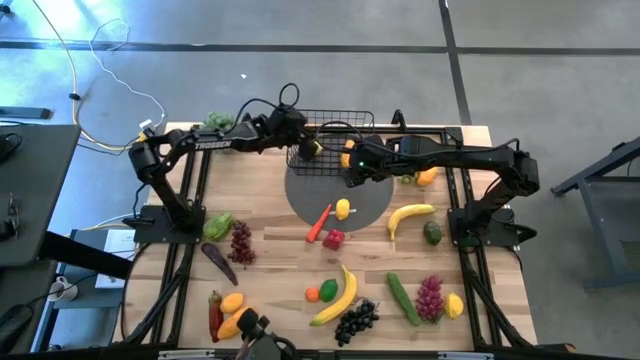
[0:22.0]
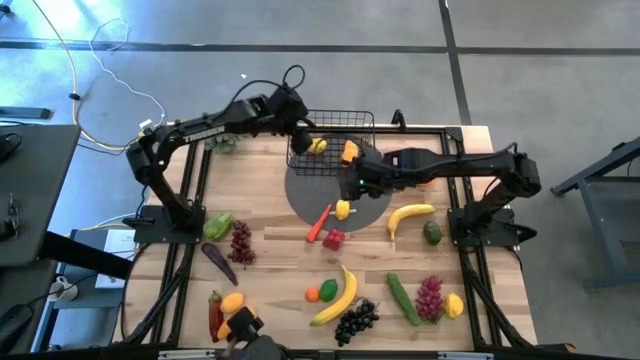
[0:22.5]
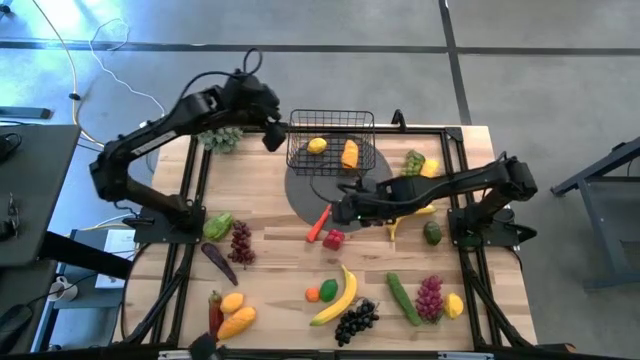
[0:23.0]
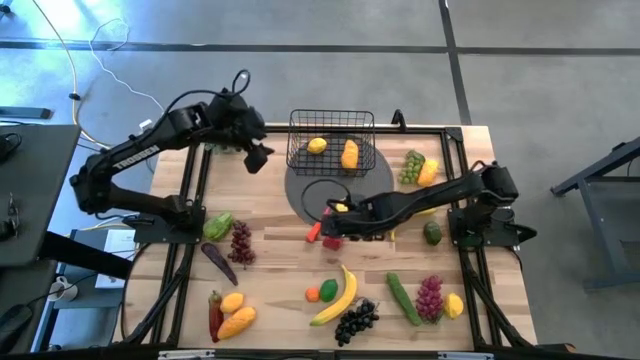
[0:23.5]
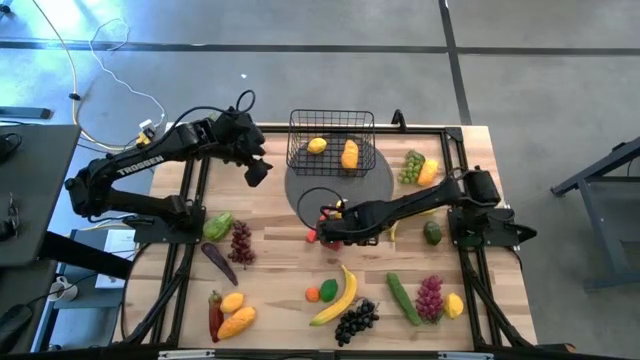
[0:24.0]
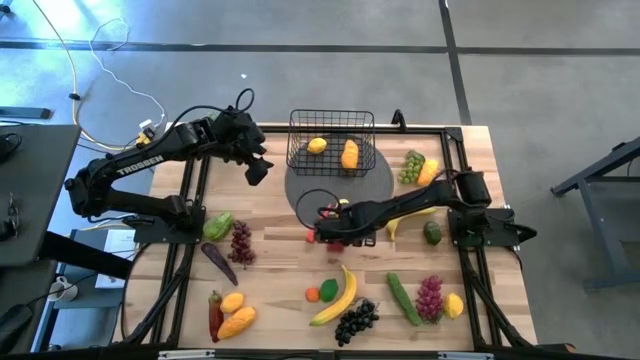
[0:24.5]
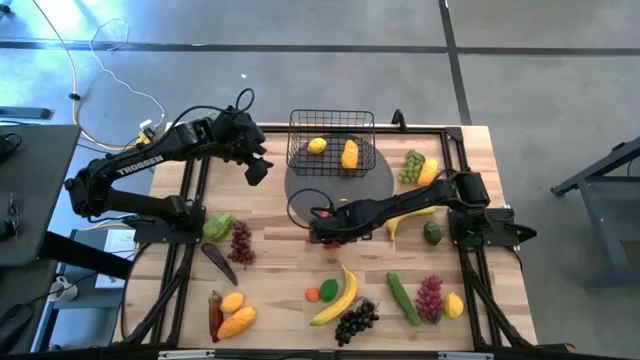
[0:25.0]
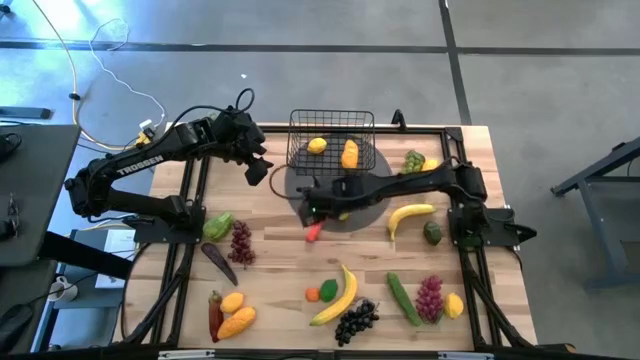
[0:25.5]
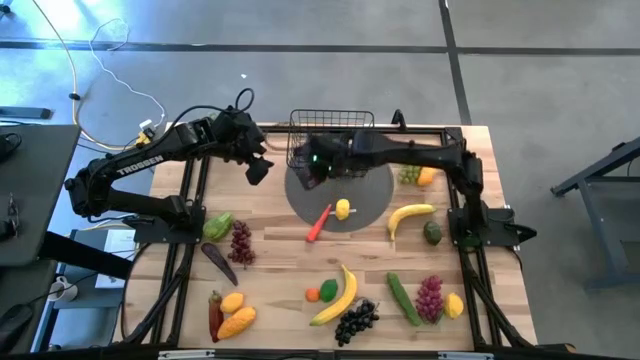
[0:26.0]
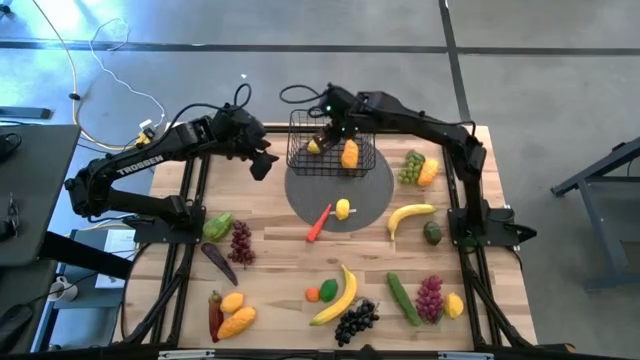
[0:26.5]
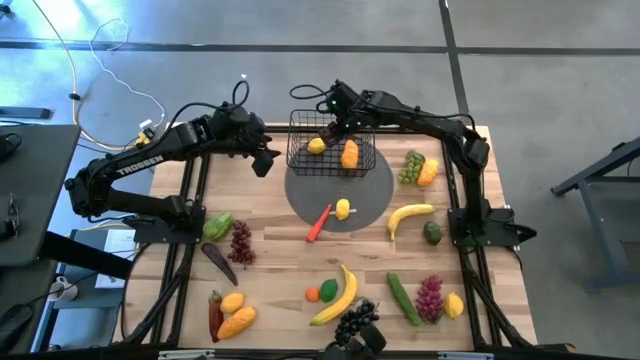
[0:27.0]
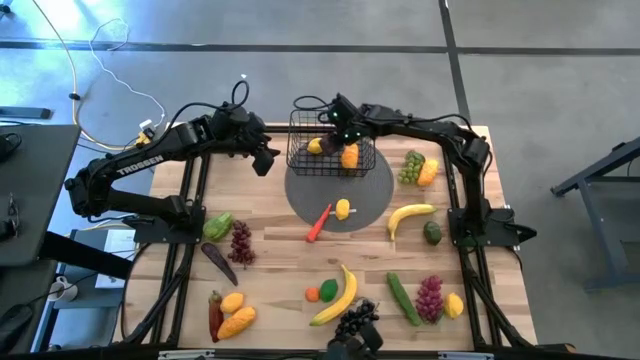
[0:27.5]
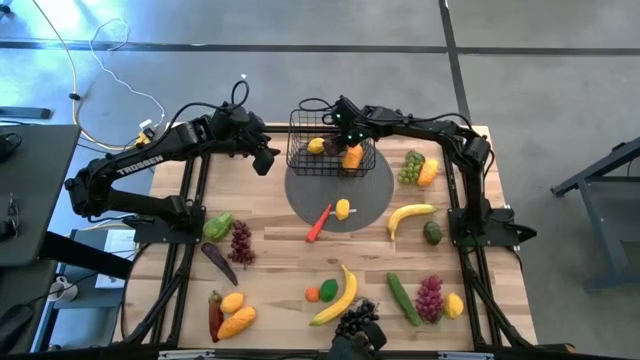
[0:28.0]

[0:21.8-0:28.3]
Task: Build produce basket
Put the bell pepper into the wire basket

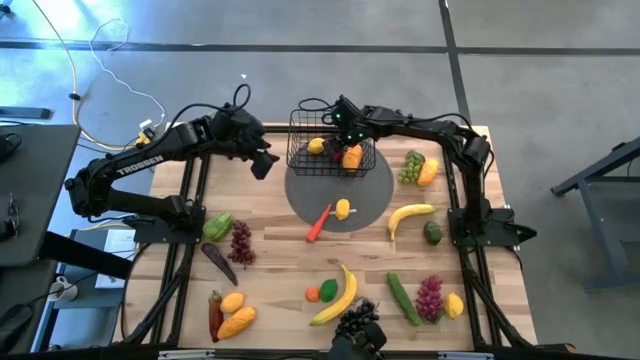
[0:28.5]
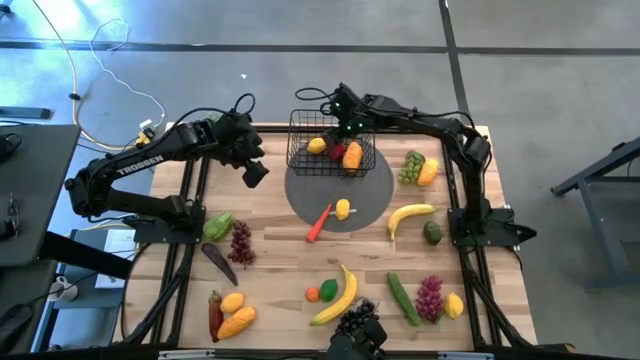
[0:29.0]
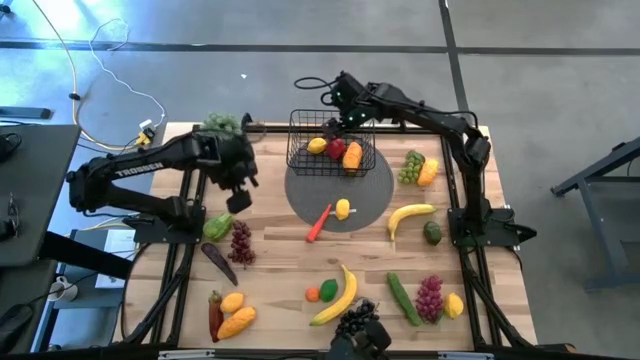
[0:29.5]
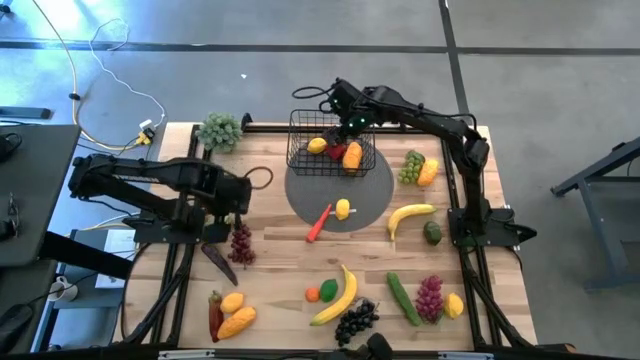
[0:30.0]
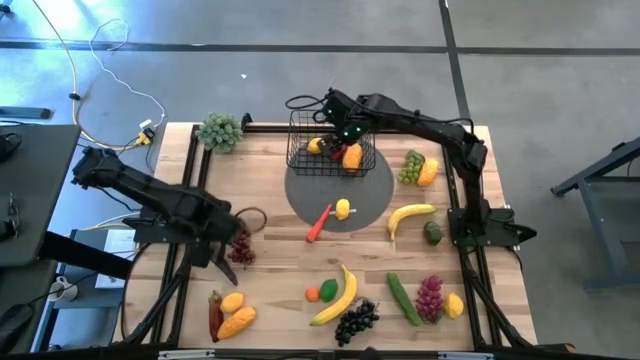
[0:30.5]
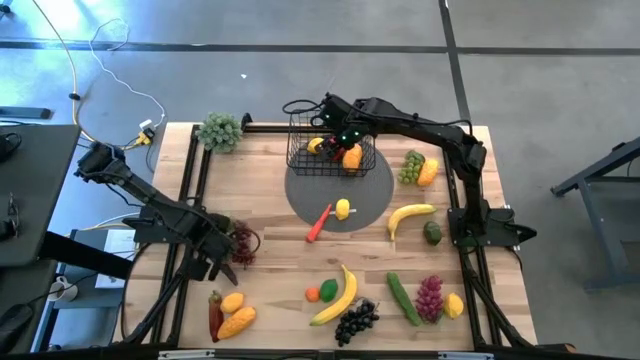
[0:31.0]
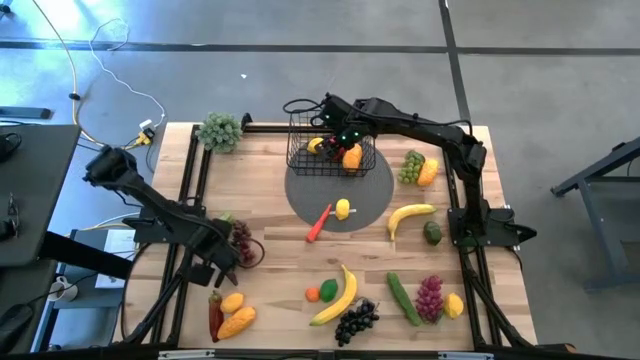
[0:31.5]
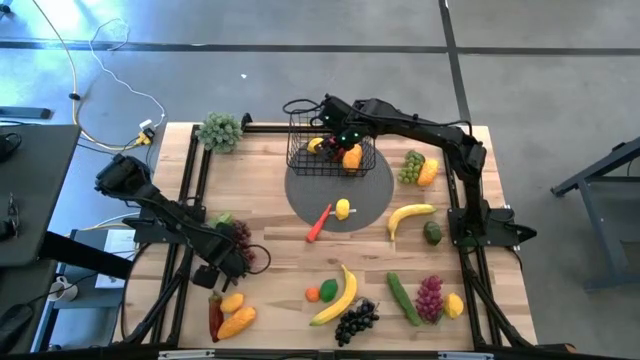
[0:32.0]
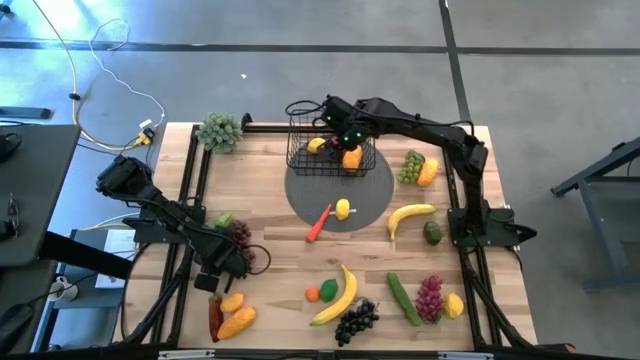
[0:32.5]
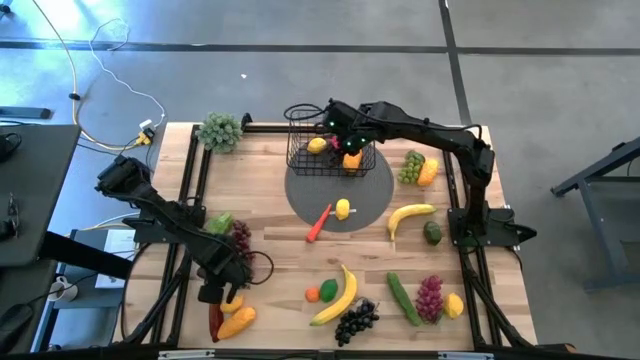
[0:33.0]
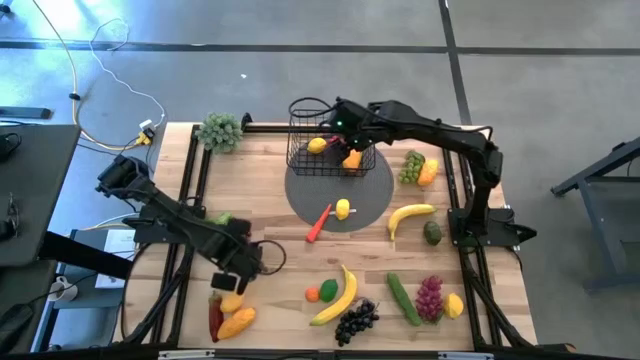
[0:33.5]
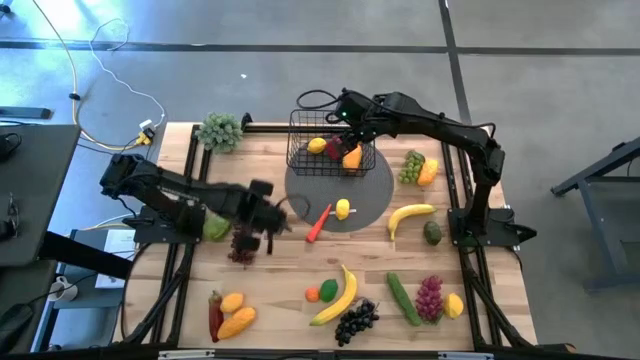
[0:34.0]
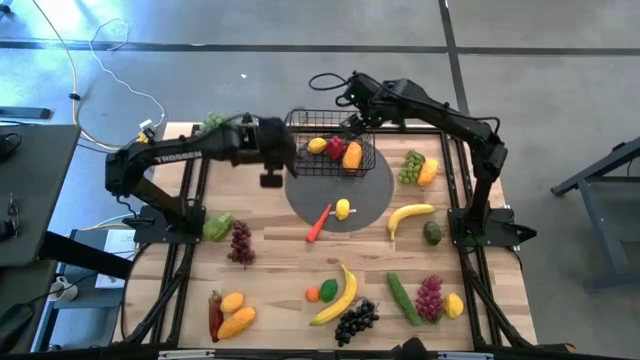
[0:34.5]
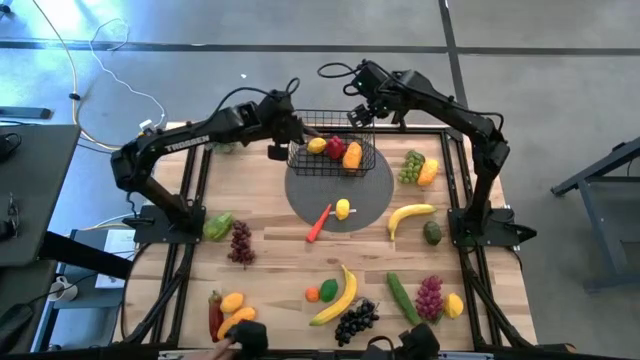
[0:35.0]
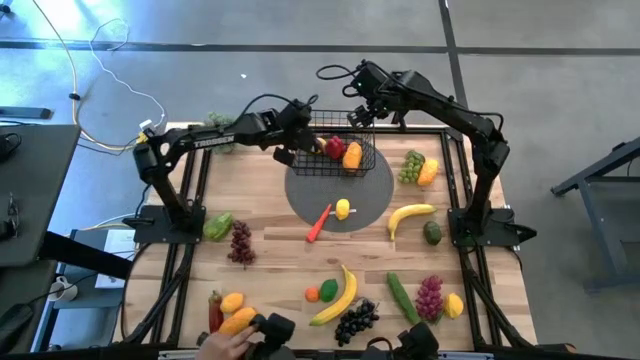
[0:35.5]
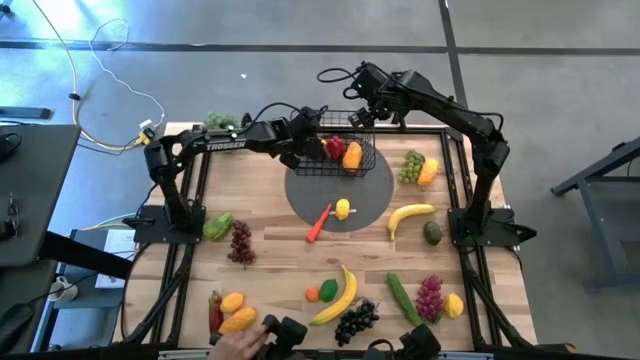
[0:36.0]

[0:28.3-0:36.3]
Put the eggplant into the wire basket

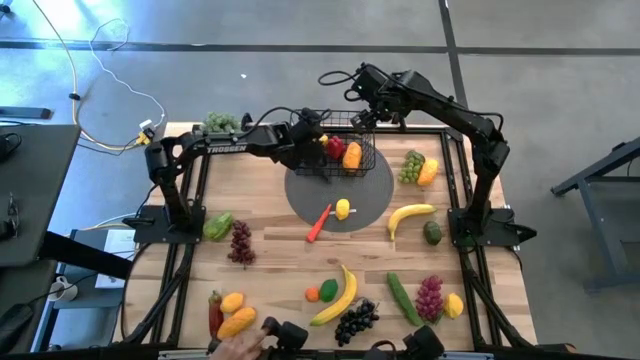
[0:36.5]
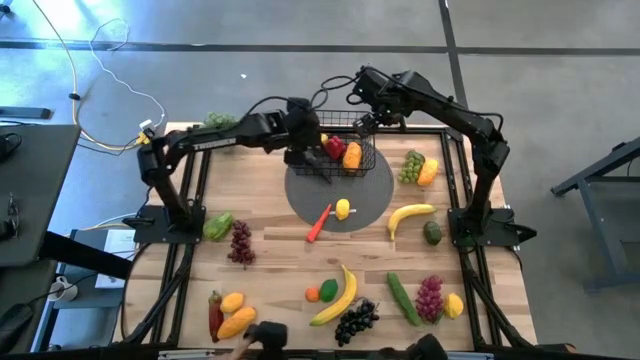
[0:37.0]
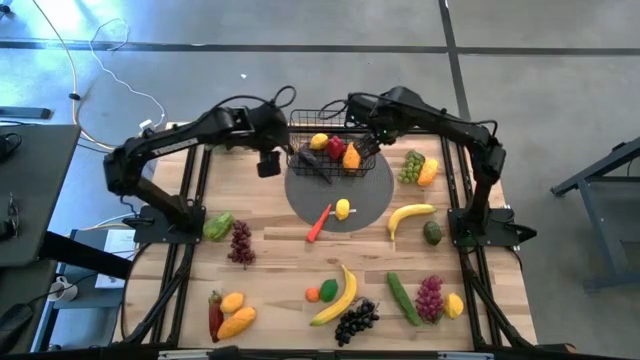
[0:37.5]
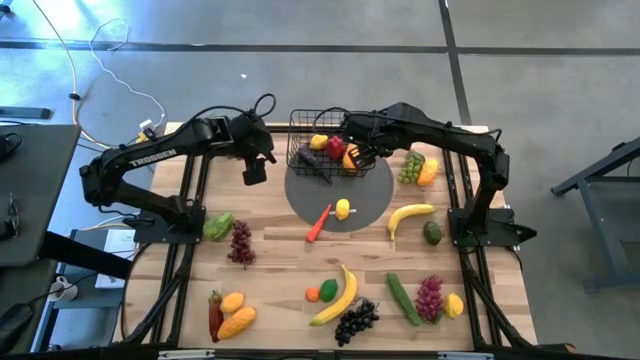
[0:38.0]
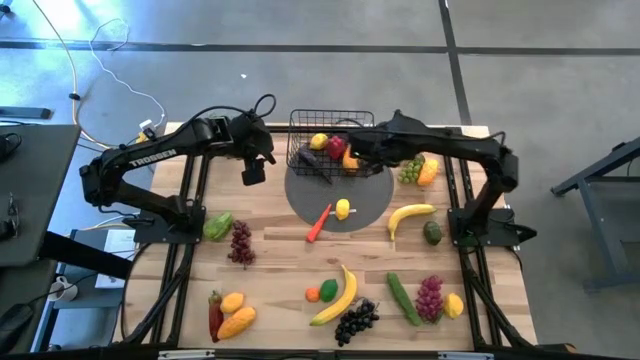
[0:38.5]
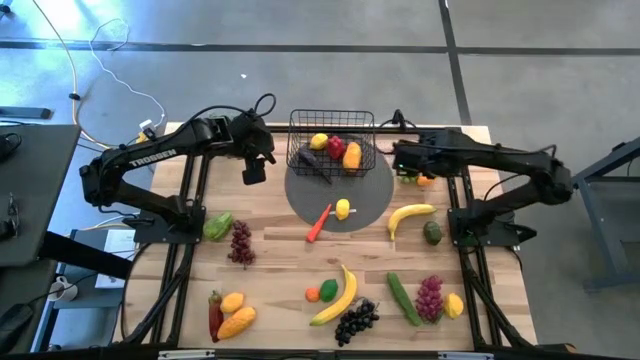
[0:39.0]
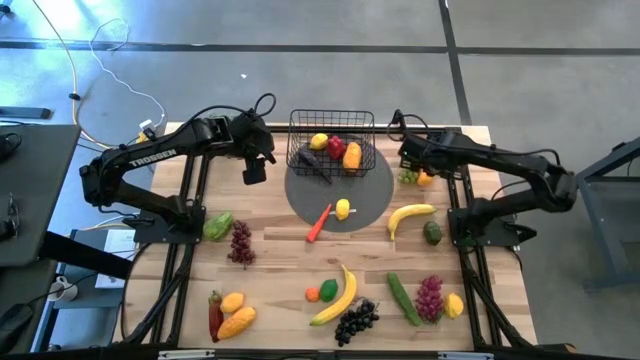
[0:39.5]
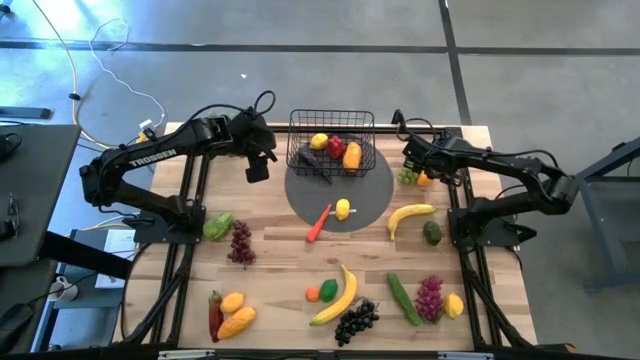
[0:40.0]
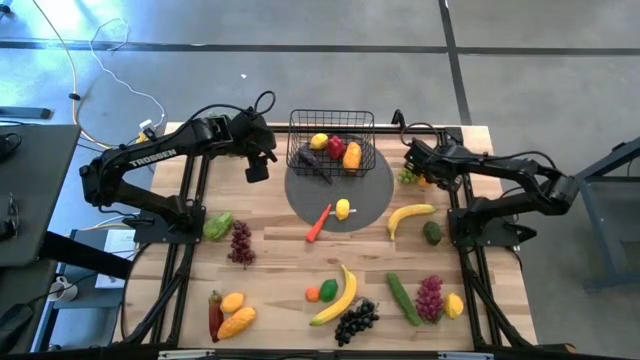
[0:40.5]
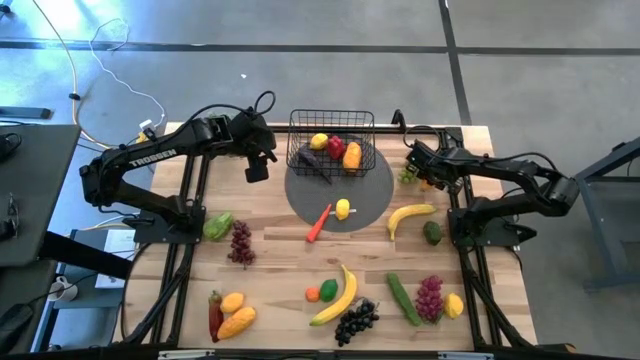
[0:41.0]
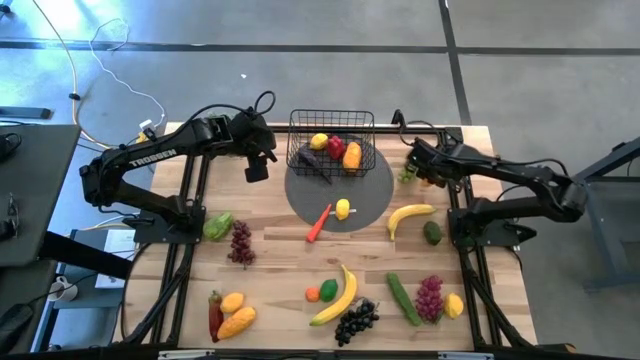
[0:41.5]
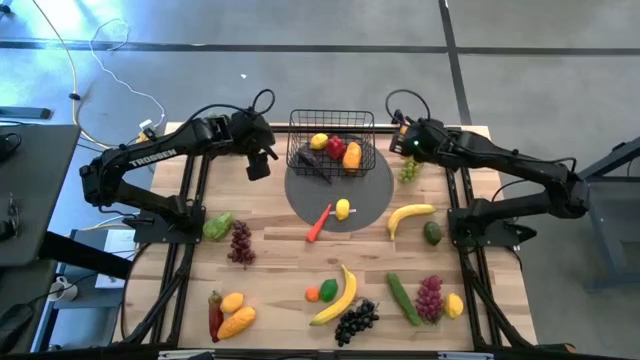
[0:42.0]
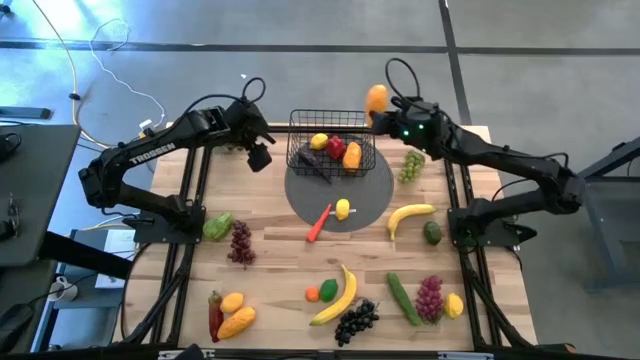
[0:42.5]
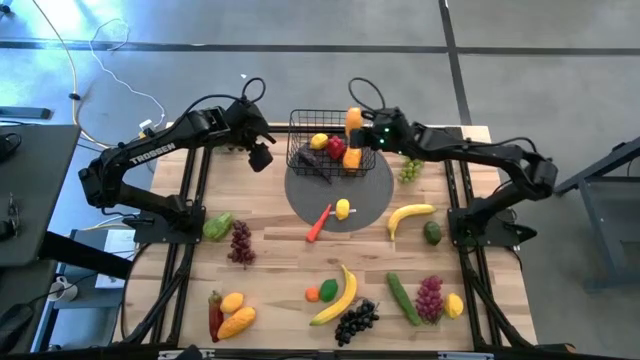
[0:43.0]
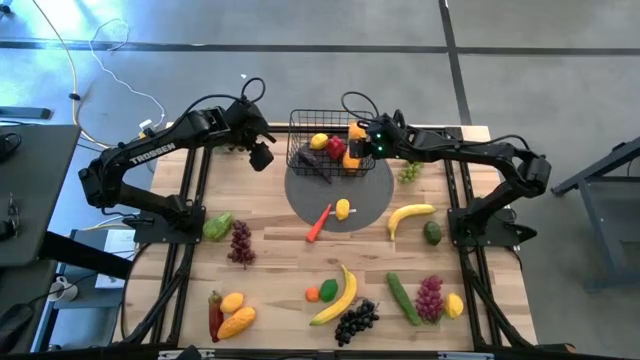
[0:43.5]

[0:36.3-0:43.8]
Put the mango into the wire basket
